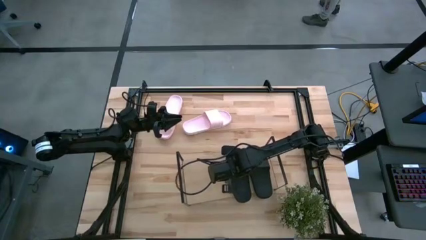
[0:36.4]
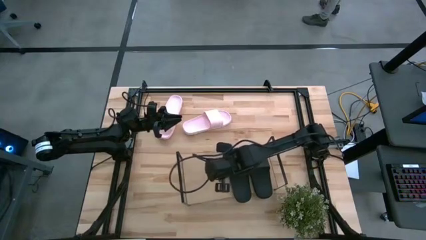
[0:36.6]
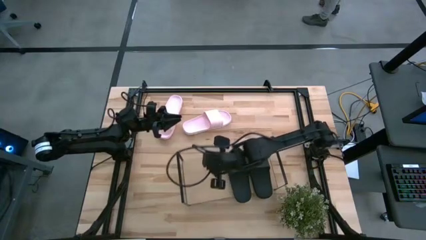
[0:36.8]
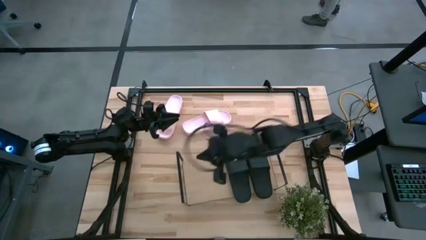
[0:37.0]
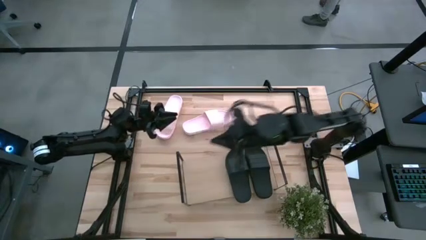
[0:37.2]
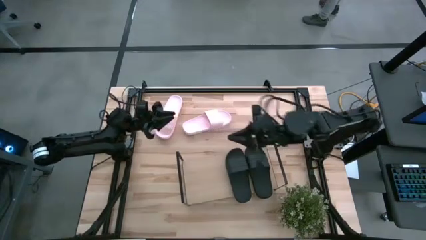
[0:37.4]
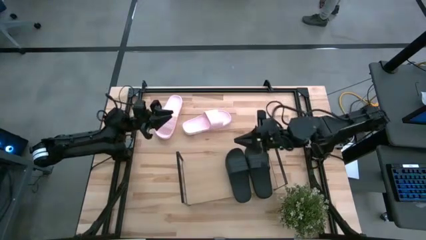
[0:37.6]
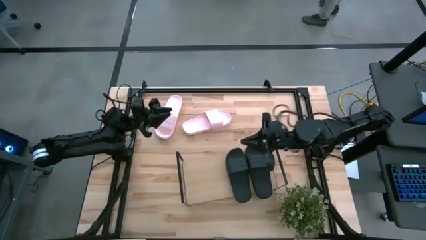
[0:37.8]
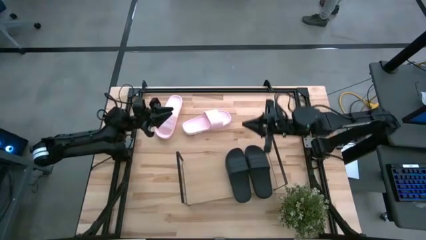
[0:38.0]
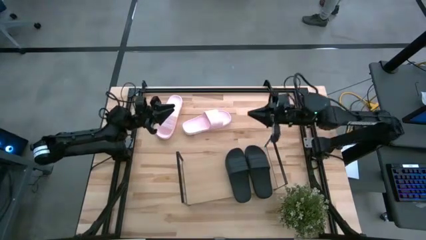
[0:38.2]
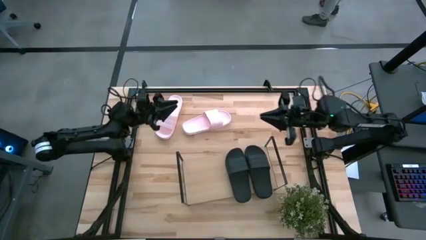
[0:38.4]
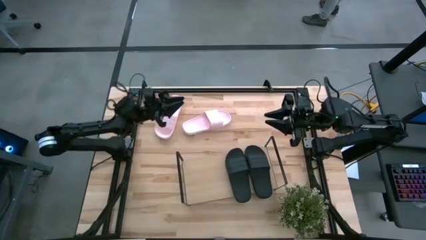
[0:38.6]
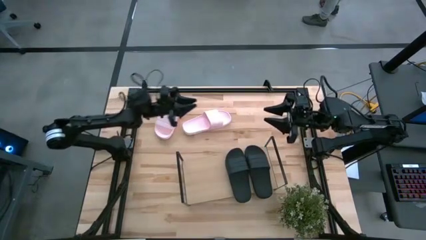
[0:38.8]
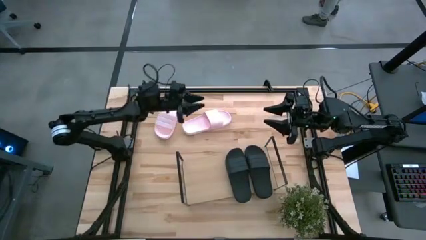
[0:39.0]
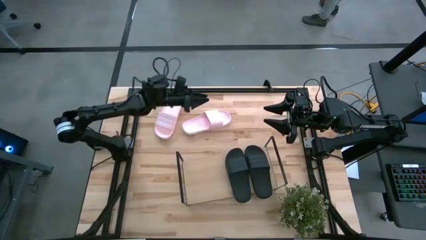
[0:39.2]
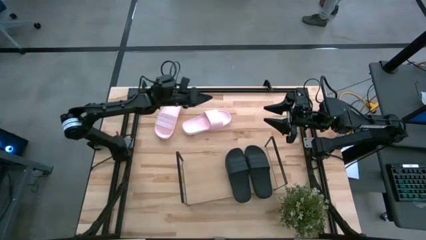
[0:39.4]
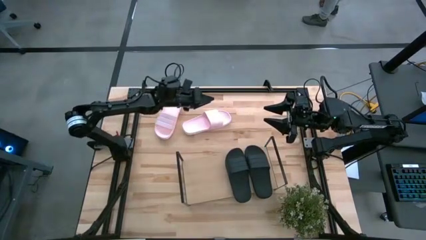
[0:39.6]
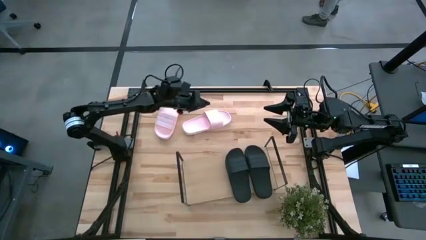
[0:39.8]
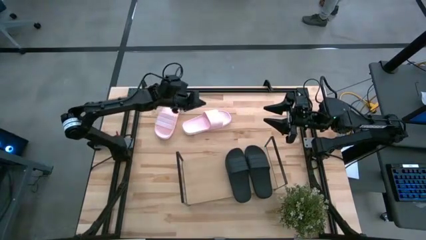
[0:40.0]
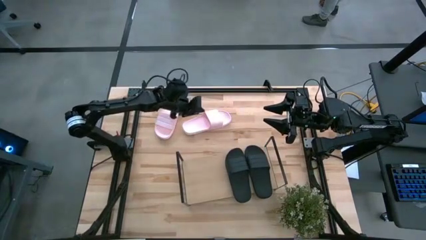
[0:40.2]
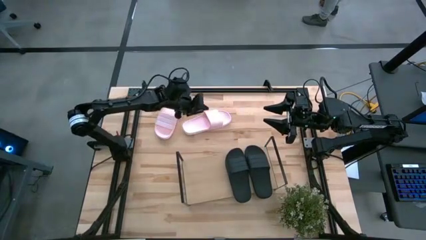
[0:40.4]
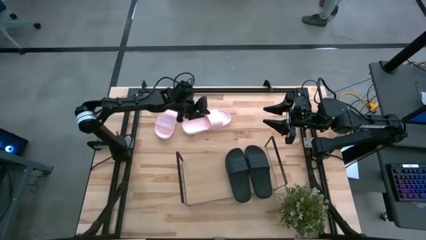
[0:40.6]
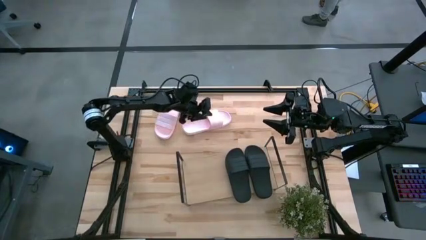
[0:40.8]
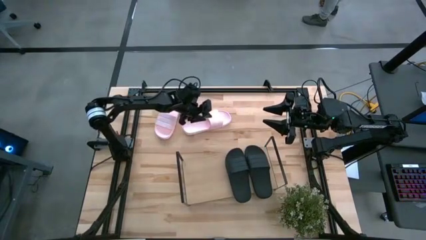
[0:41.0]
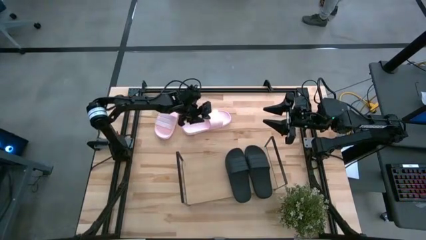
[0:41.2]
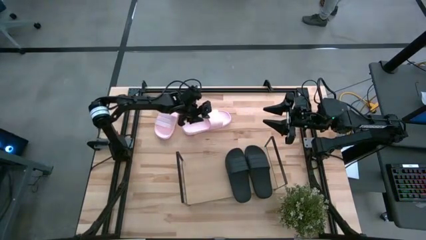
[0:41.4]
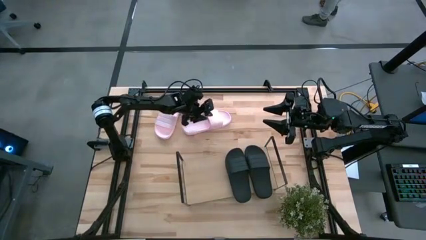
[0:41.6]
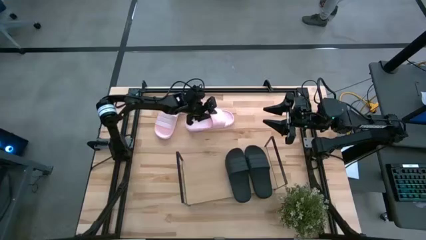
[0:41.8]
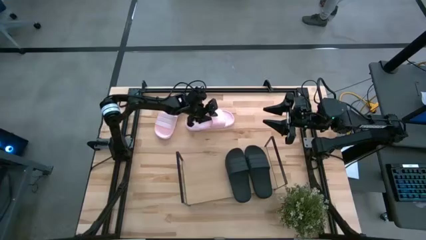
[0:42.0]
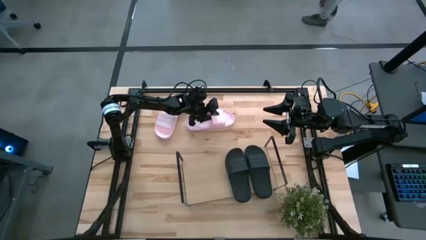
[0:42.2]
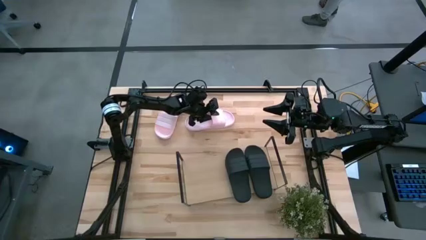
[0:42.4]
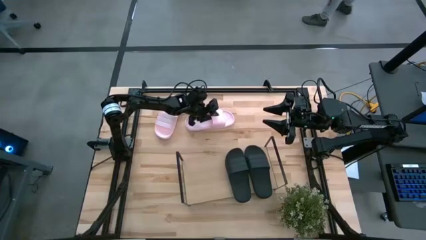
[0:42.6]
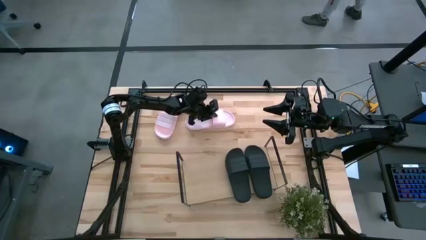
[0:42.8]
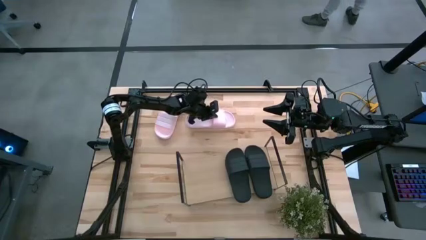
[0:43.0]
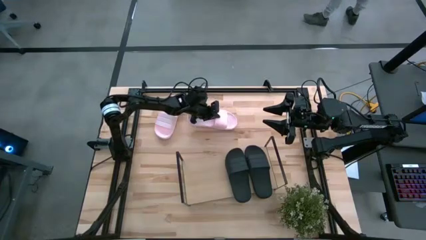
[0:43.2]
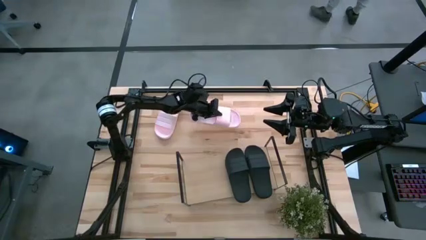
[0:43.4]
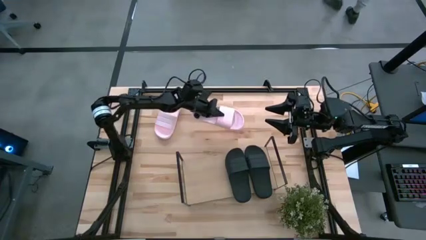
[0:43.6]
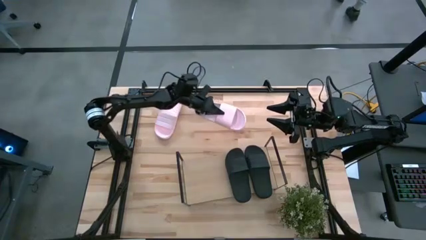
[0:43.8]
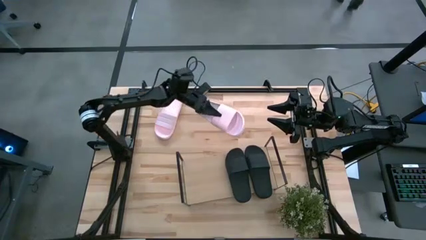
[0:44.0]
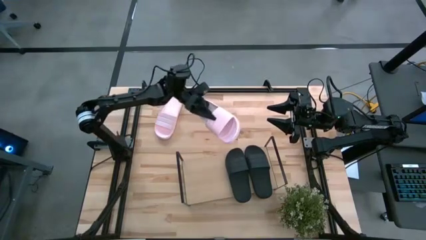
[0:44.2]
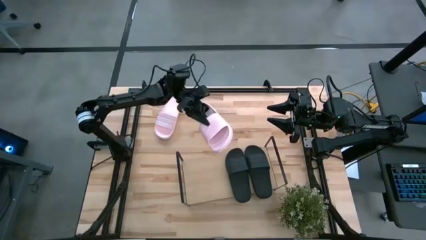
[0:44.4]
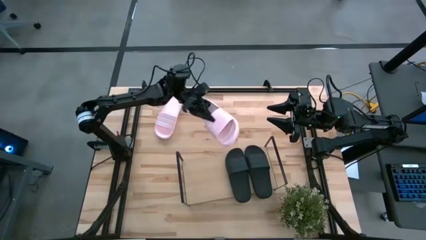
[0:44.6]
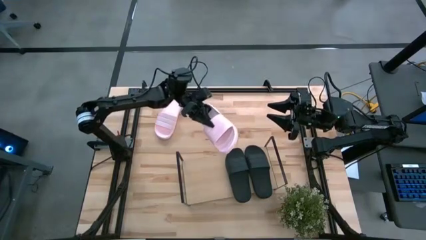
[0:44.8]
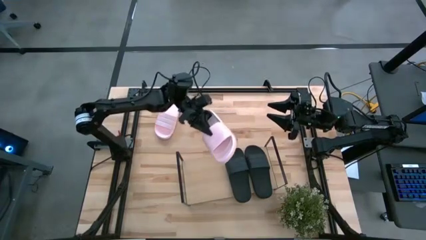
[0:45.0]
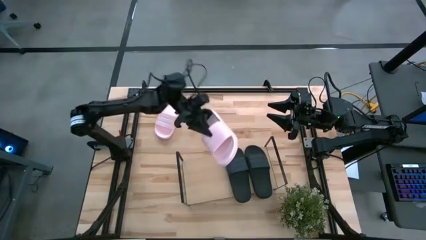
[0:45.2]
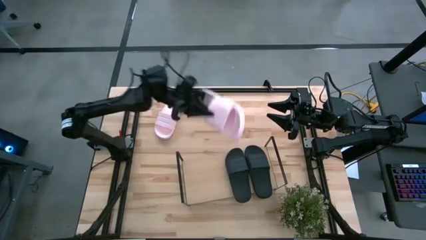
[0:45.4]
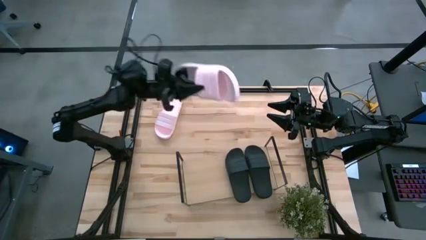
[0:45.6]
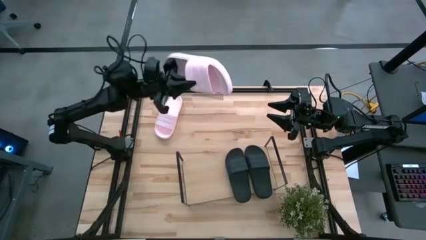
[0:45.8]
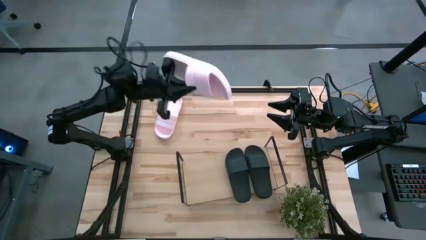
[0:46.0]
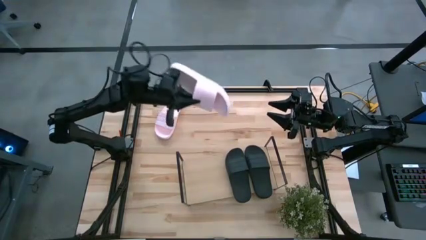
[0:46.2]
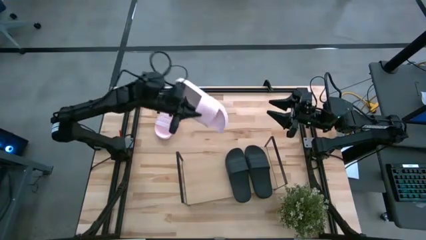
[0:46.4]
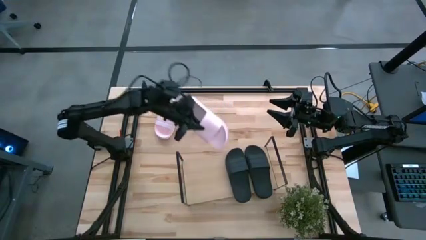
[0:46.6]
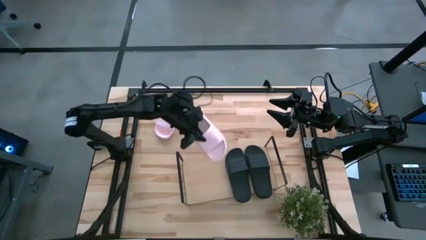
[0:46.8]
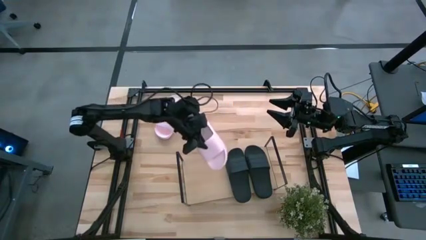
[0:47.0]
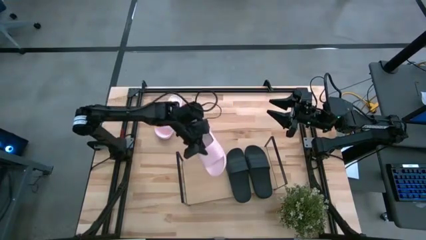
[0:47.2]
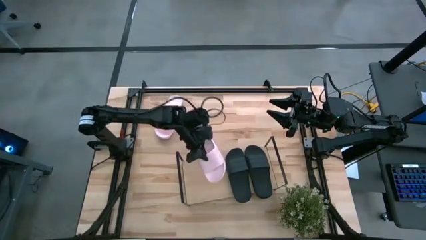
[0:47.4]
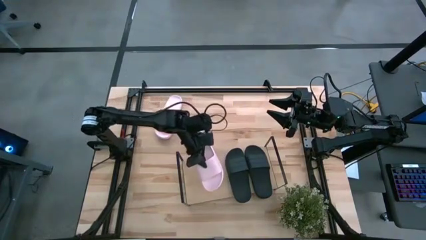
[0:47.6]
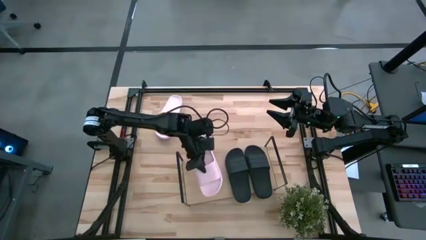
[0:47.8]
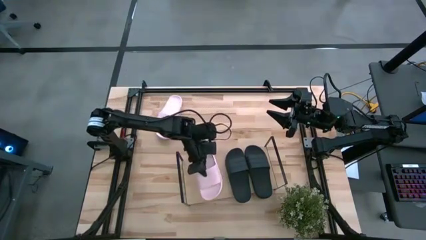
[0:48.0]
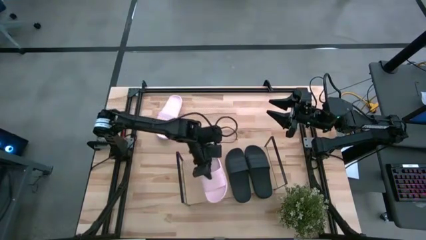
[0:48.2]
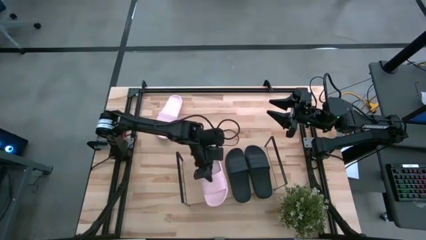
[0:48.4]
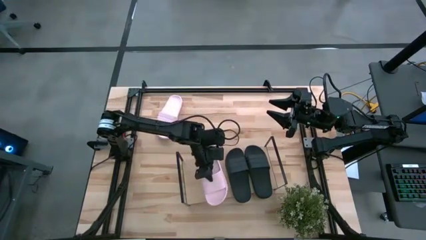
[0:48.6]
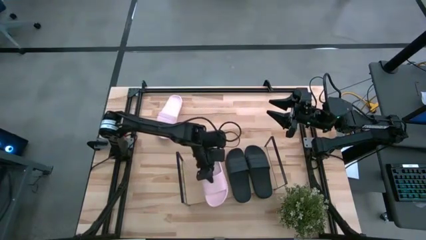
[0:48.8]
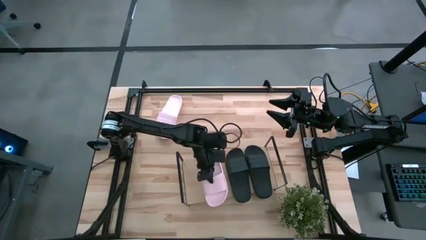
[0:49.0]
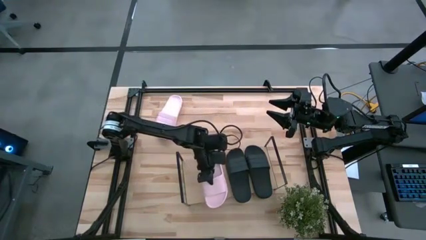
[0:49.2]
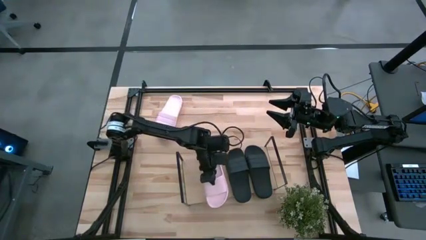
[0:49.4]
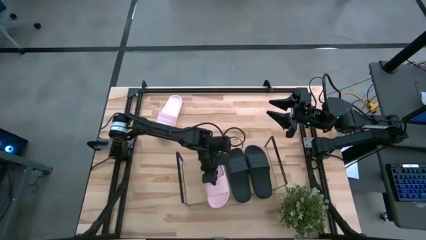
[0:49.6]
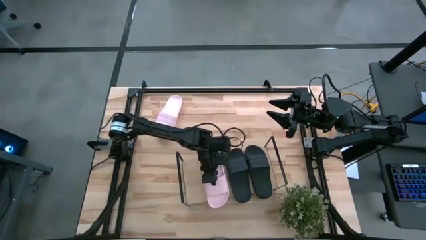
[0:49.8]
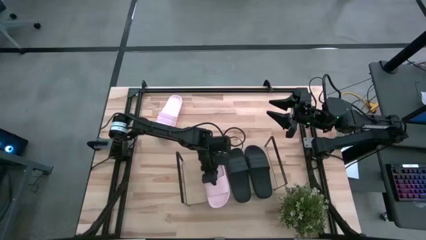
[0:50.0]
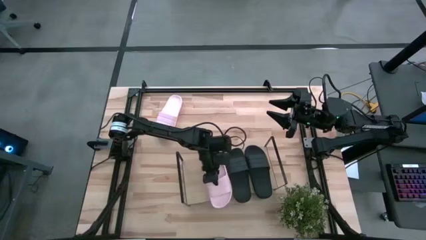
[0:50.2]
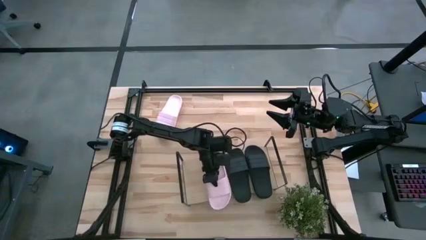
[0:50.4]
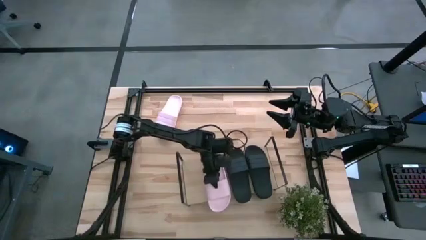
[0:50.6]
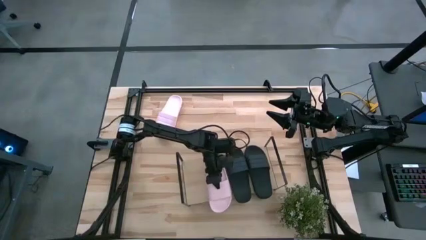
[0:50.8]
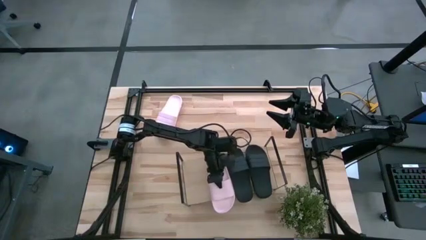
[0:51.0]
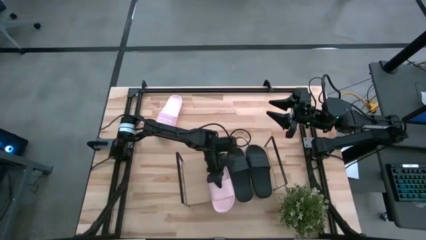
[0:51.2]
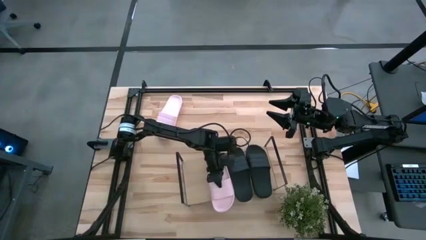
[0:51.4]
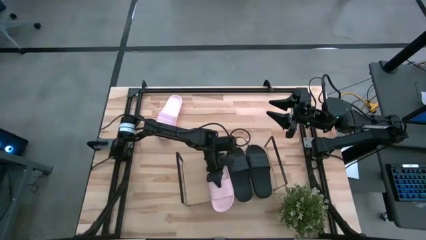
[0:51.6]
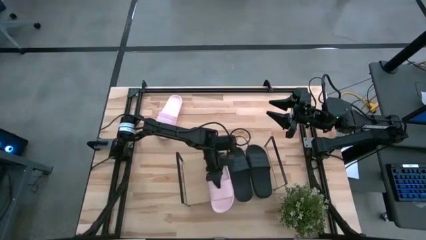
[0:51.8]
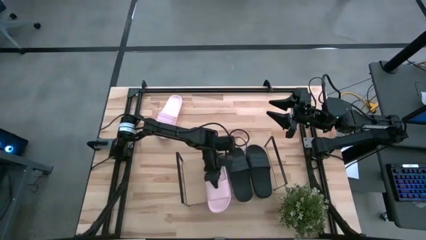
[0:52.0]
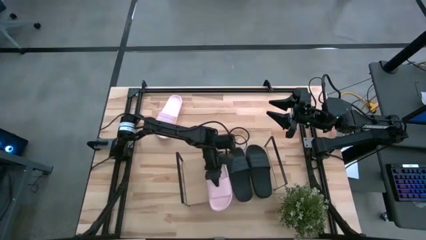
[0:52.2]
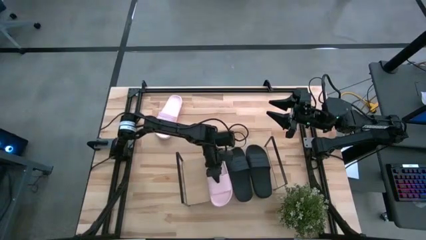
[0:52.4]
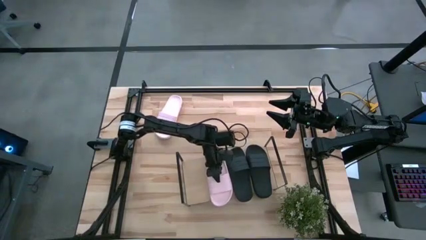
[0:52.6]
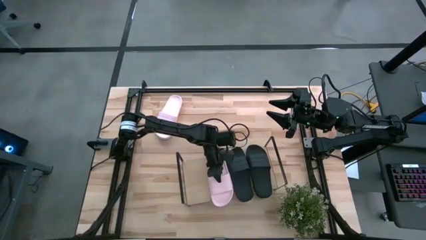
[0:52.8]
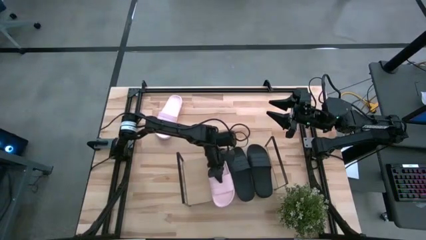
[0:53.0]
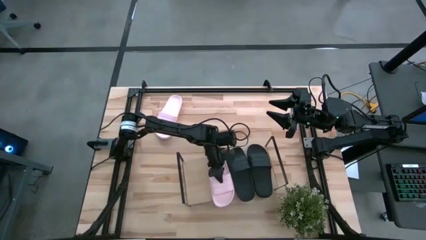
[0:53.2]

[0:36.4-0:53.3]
Task: Pick and place slides into the shelf
Put the right pink slide on the shelf
